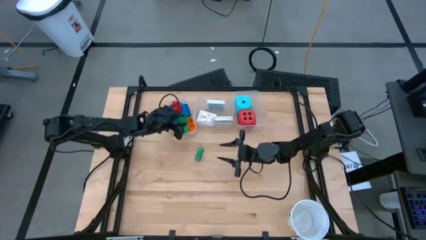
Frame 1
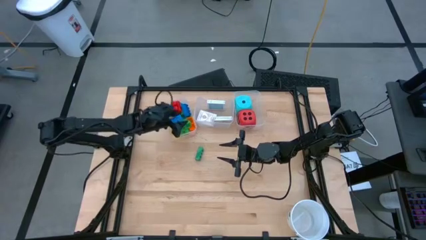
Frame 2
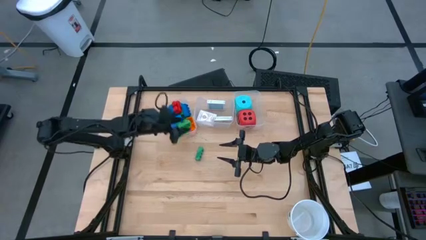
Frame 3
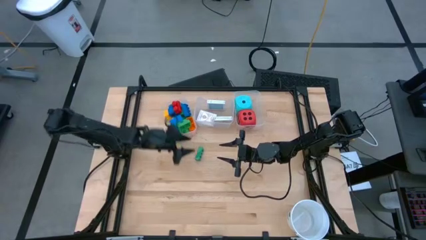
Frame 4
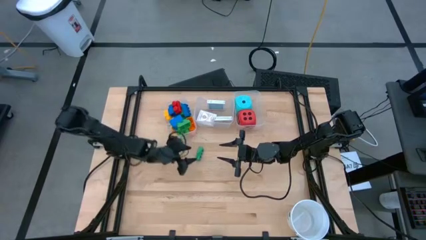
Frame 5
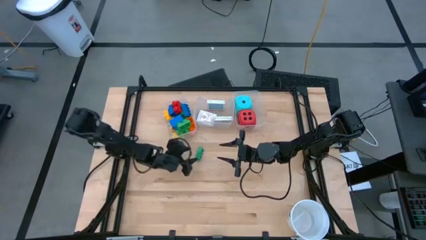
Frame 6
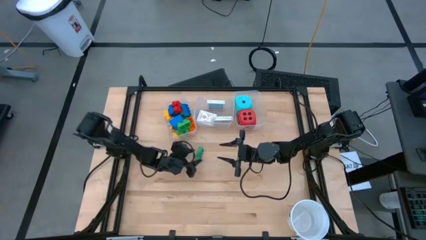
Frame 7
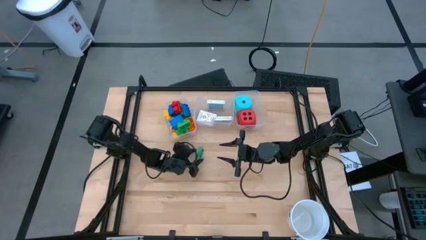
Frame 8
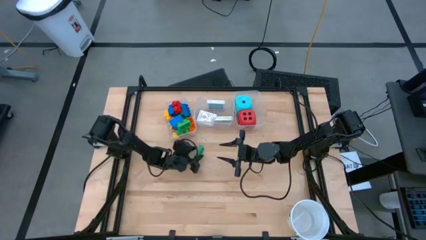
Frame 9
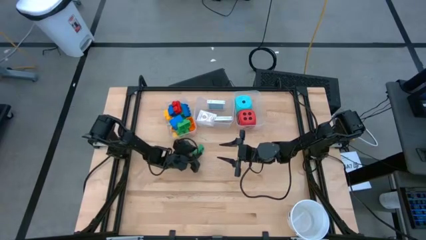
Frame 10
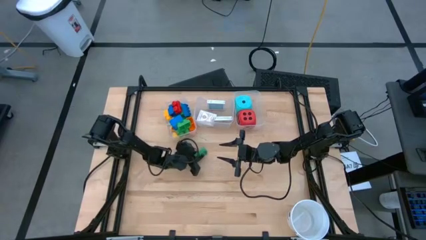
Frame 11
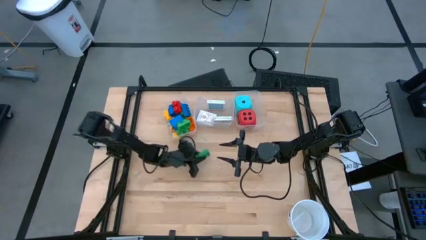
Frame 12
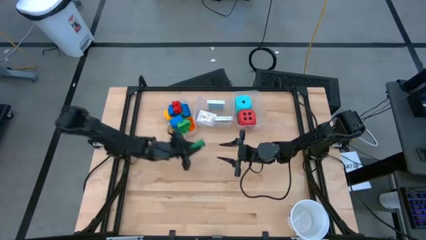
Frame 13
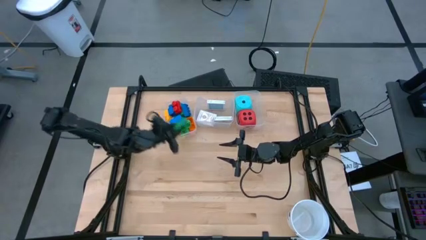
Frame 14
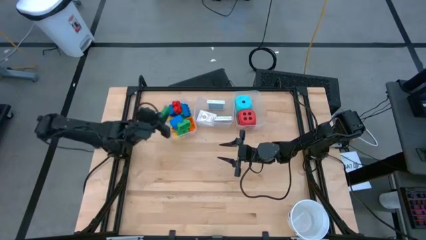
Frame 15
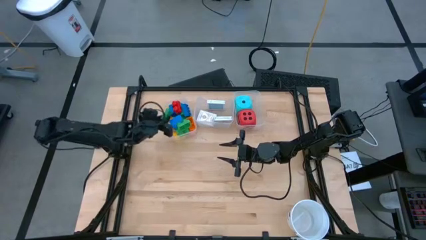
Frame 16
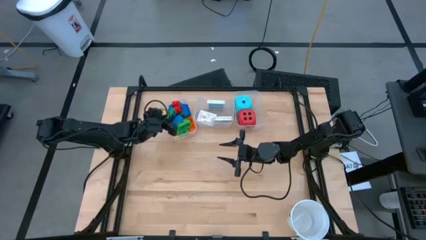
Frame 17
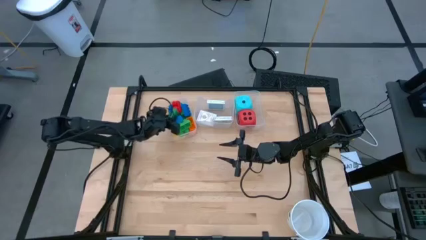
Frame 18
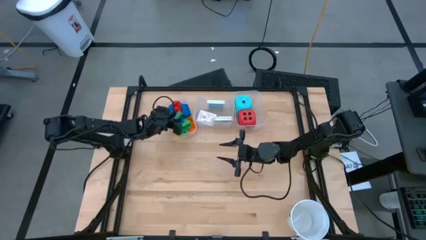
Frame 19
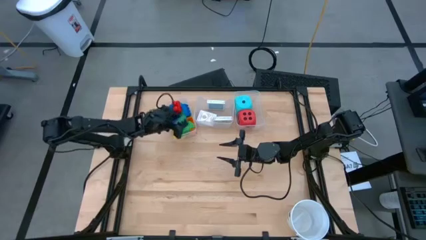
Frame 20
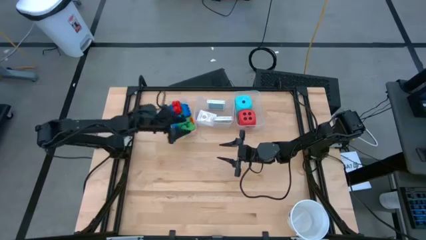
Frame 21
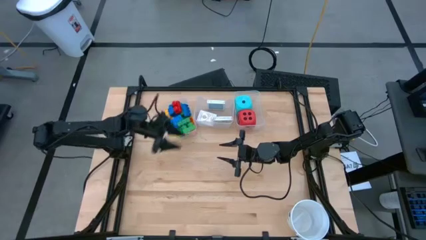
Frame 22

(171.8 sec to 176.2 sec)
Task: Pick & Place Toys
Put the green game piece into the left transparent bin

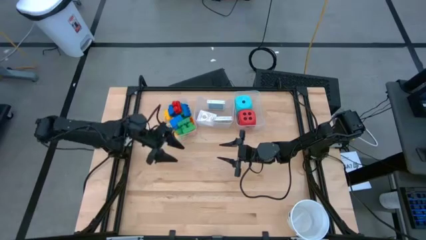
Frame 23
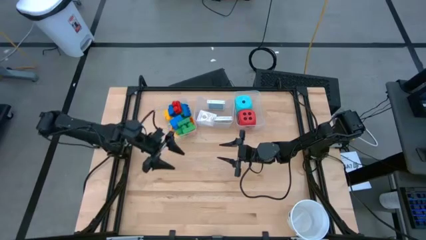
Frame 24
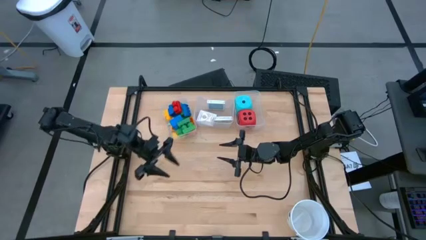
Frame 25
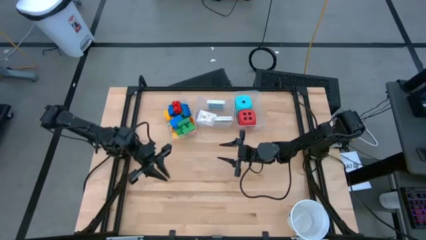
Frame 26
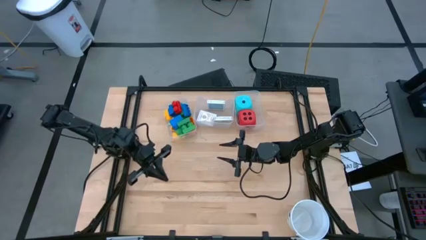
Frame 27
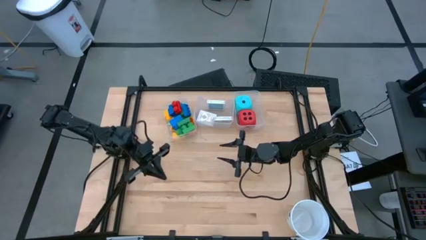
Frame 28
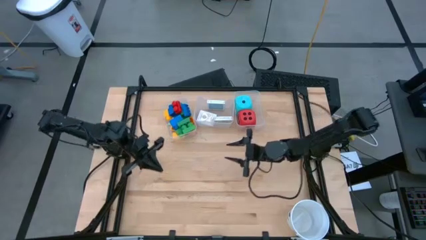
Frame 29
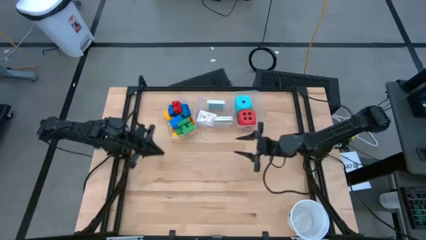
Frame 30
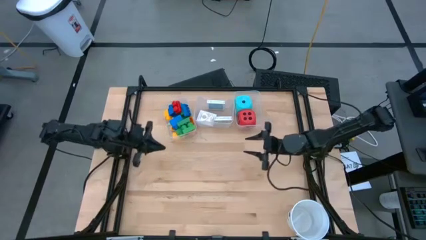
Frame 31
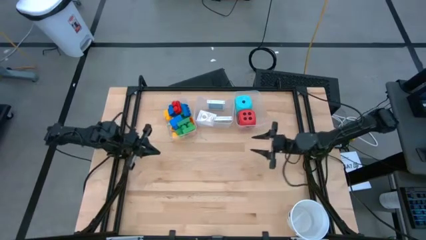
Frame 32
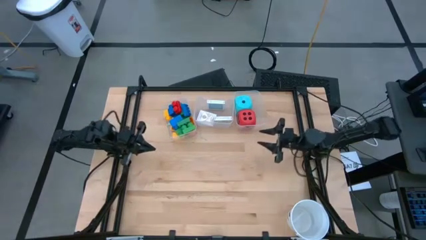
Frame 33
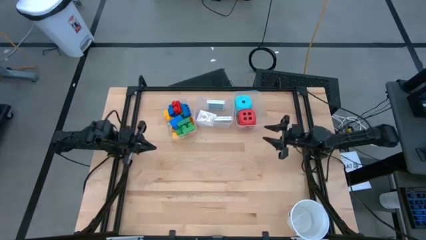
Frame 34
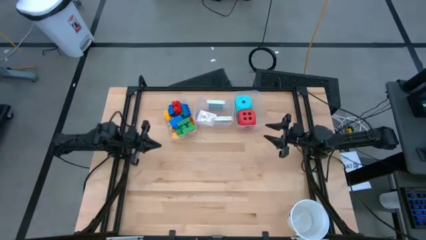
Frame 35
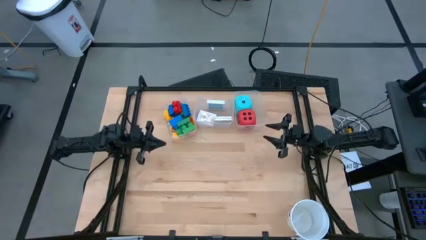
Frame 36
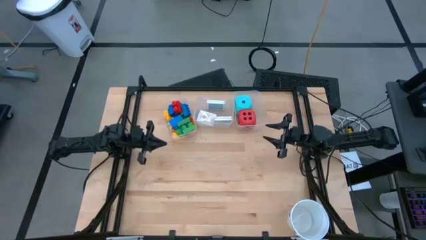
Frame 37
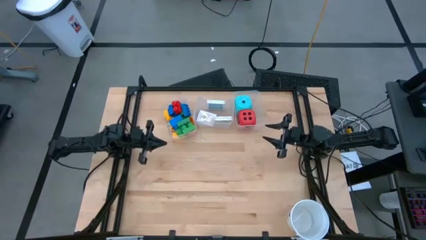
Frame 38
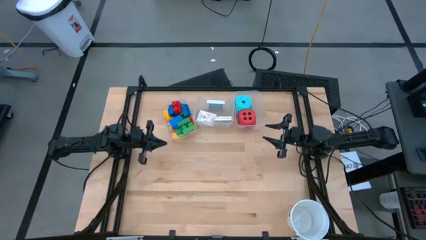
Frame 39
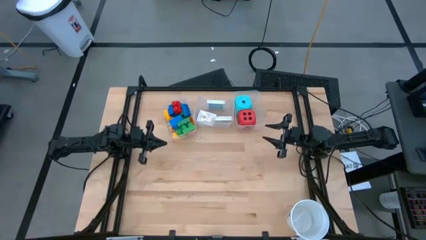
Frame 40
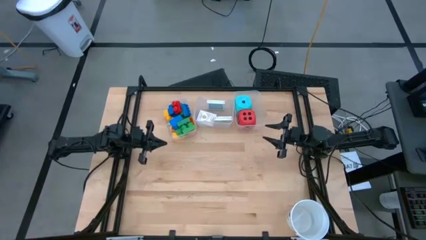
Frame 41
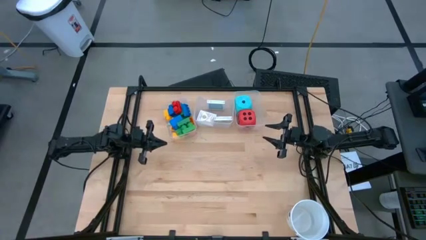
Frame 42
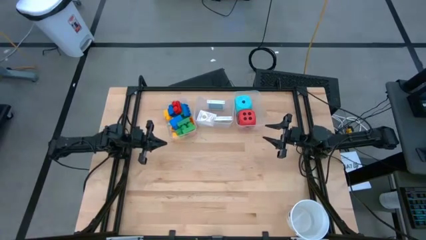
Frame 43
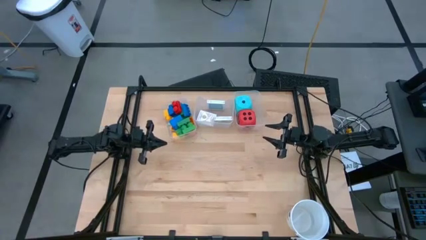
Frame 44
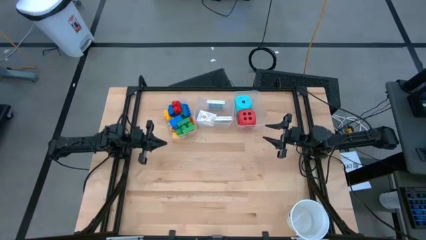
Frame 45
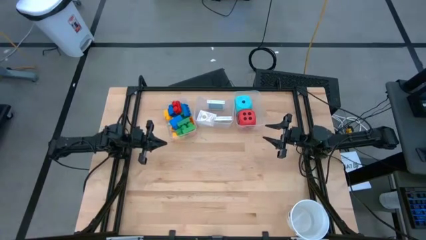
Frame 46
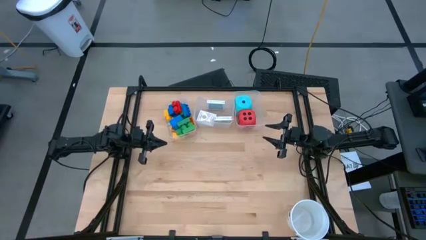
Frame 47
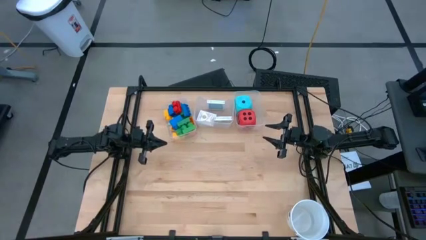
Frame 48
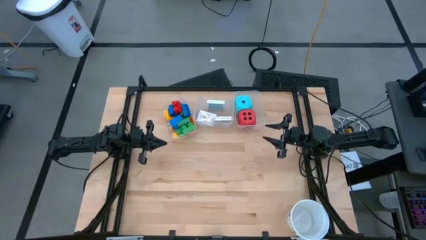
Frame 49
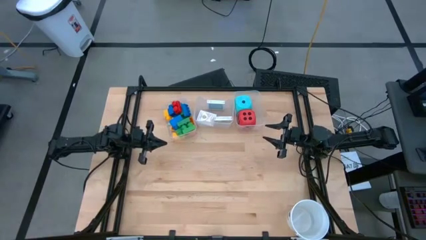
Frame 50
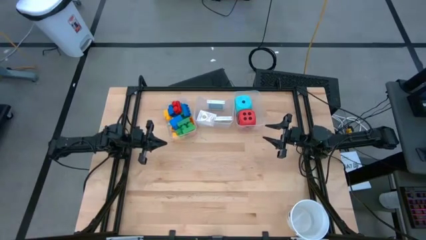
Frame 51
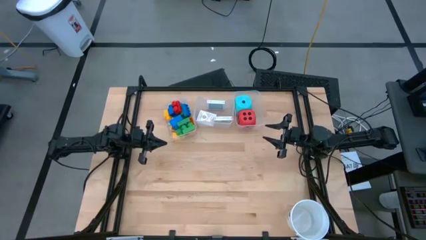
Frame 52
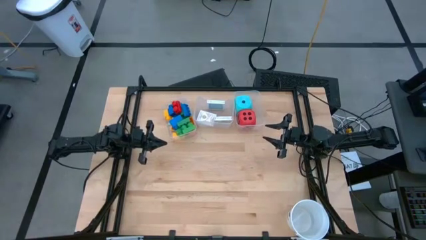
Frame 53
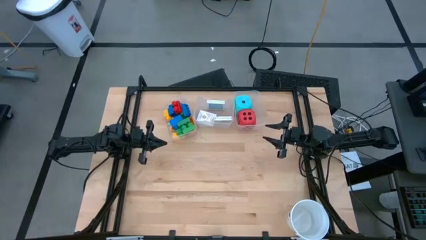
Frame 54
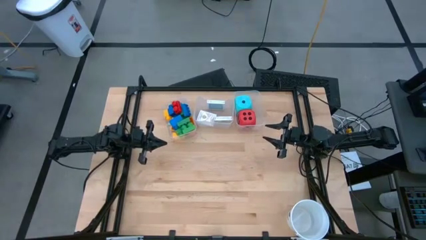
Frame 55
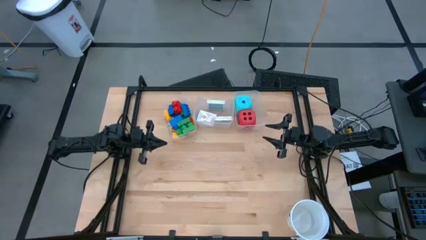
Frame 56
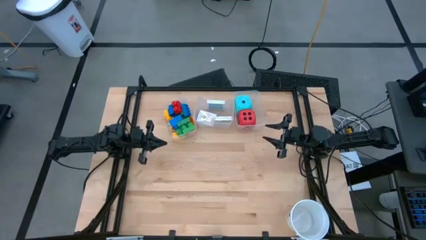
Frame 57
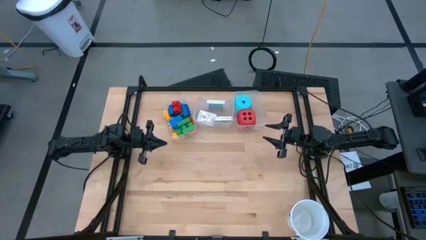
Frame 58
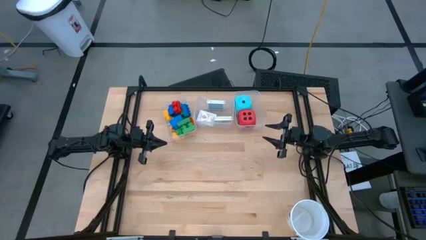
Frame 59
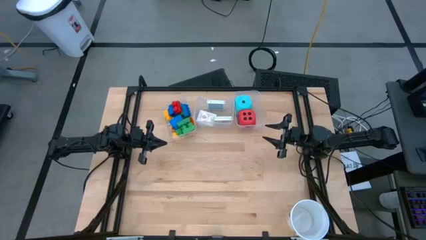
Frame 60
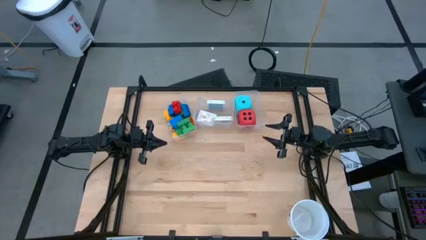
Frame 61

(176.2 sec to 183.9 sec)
Return to Home Position
